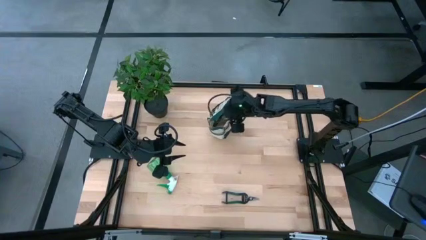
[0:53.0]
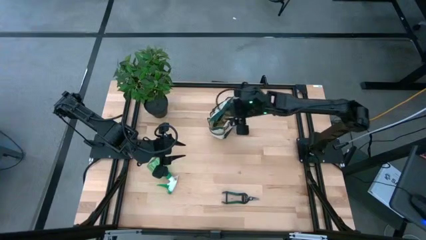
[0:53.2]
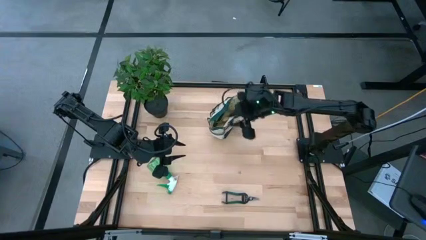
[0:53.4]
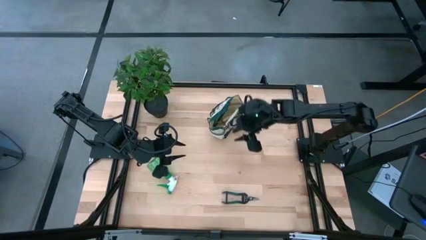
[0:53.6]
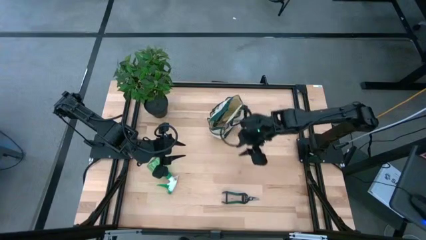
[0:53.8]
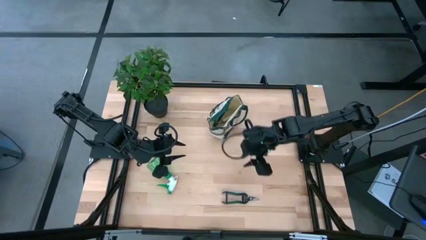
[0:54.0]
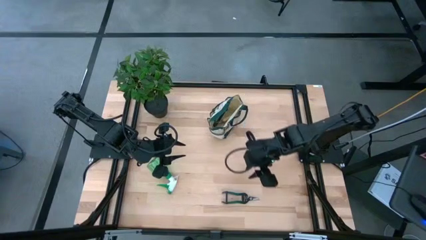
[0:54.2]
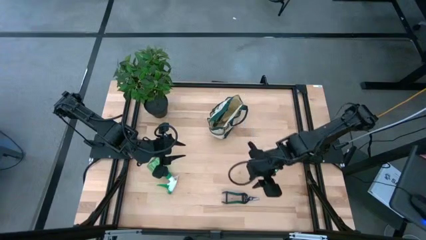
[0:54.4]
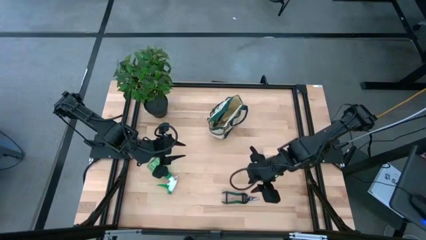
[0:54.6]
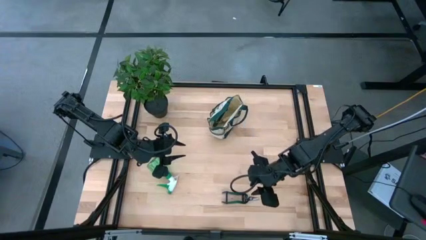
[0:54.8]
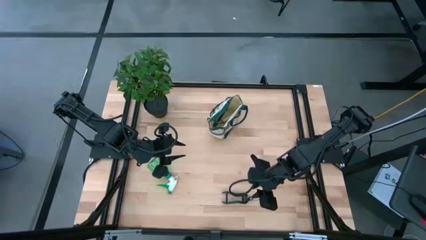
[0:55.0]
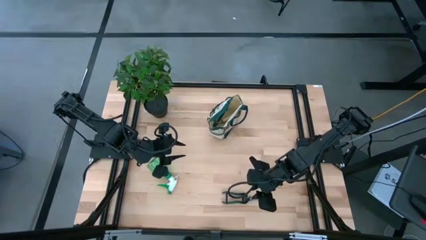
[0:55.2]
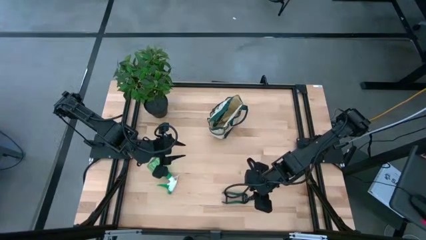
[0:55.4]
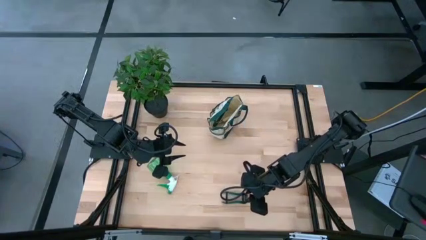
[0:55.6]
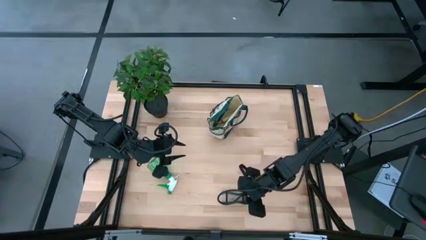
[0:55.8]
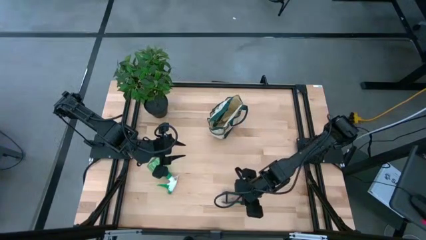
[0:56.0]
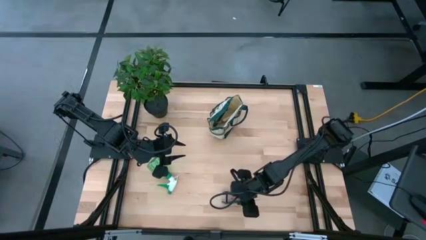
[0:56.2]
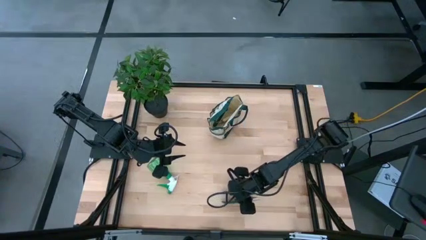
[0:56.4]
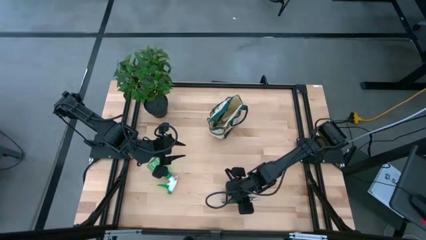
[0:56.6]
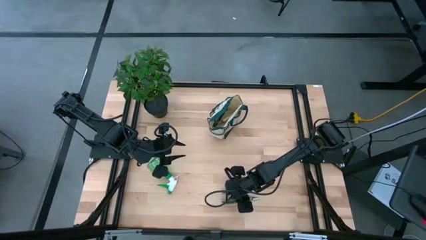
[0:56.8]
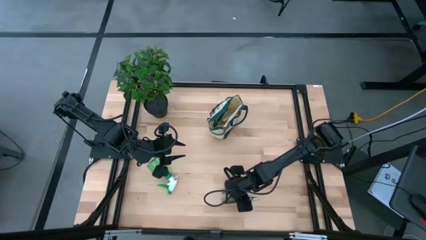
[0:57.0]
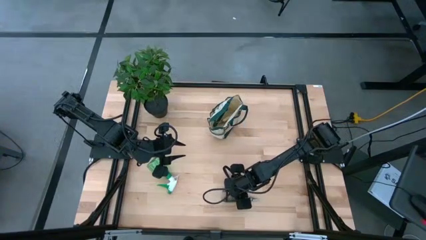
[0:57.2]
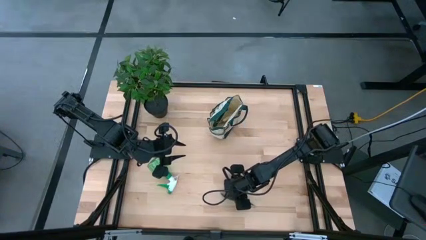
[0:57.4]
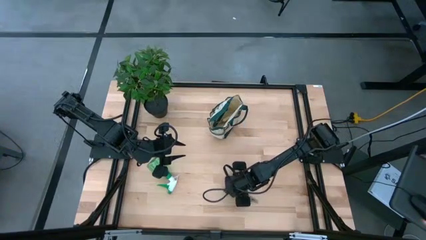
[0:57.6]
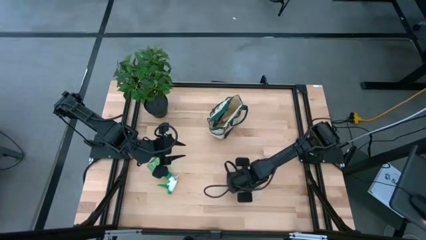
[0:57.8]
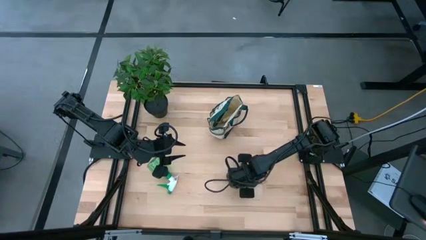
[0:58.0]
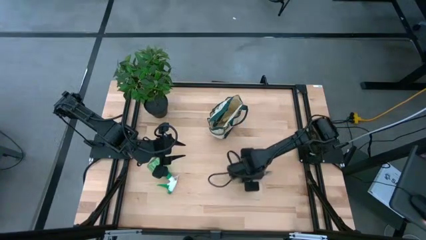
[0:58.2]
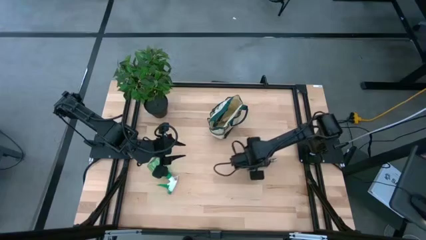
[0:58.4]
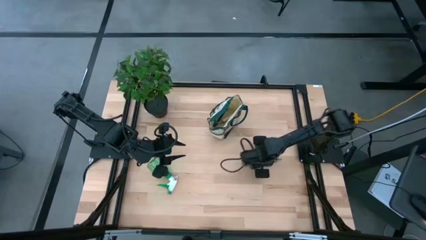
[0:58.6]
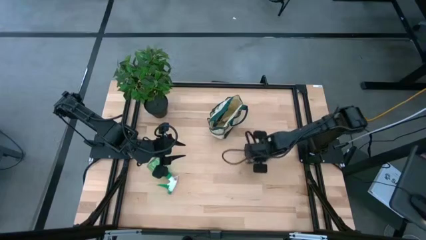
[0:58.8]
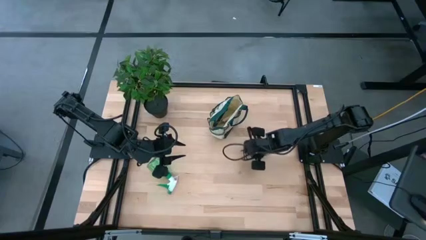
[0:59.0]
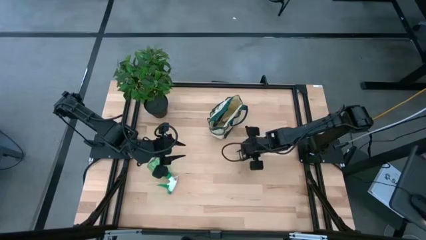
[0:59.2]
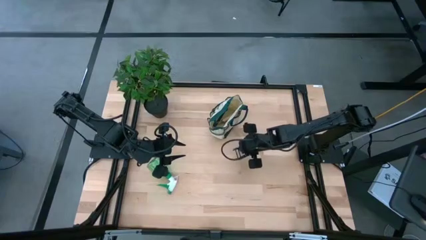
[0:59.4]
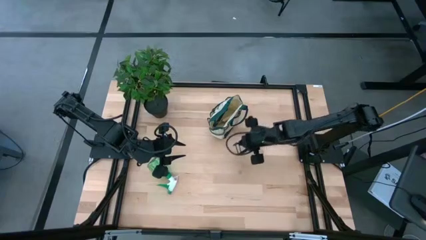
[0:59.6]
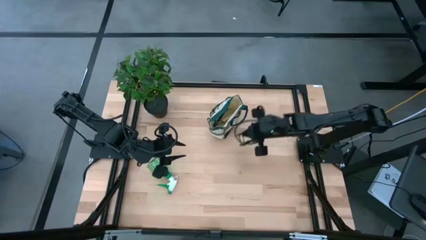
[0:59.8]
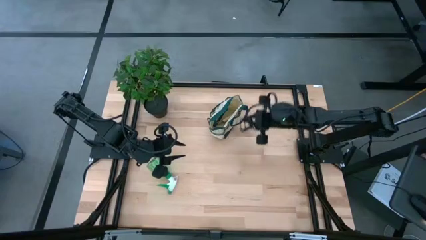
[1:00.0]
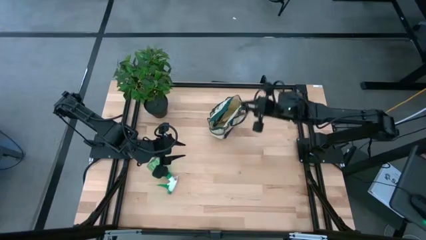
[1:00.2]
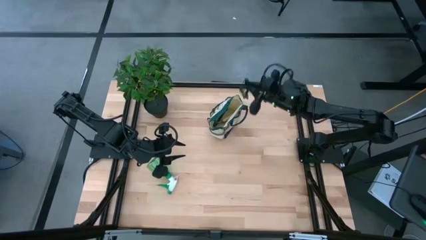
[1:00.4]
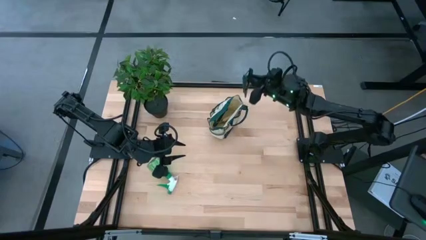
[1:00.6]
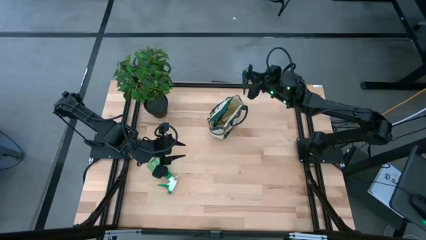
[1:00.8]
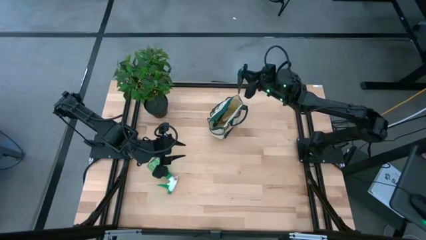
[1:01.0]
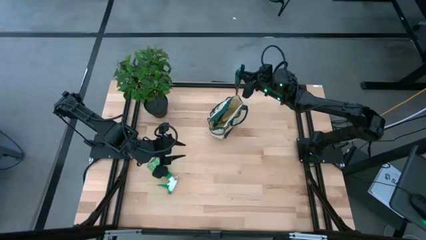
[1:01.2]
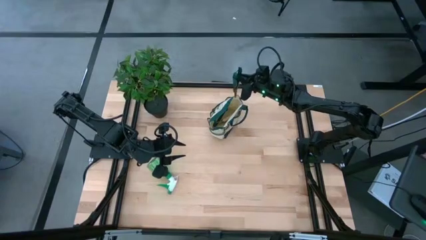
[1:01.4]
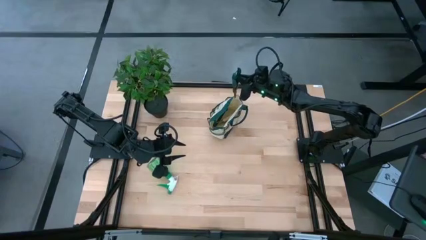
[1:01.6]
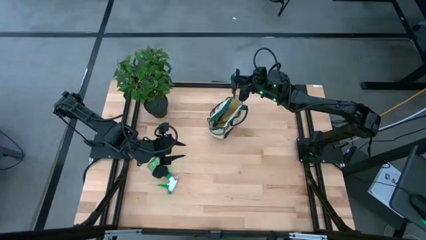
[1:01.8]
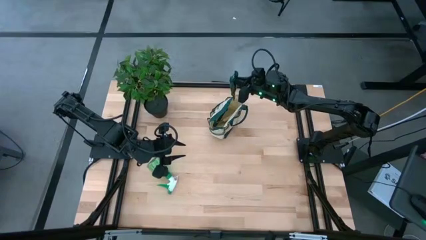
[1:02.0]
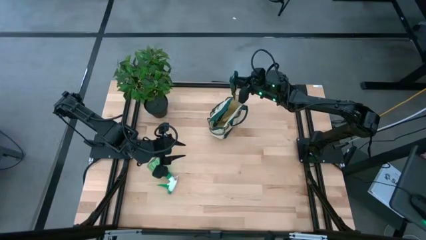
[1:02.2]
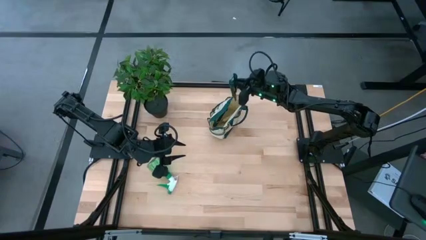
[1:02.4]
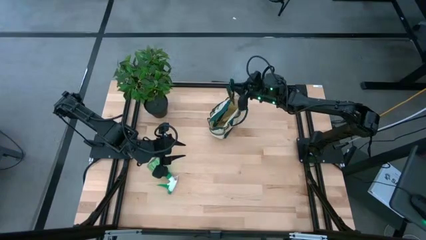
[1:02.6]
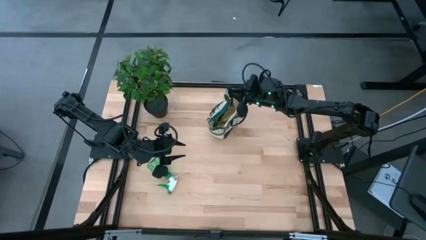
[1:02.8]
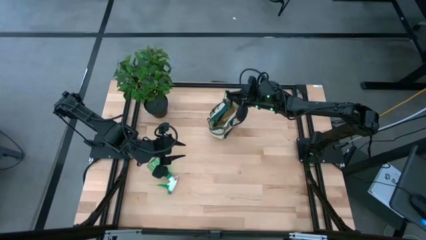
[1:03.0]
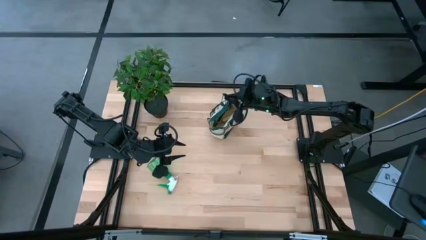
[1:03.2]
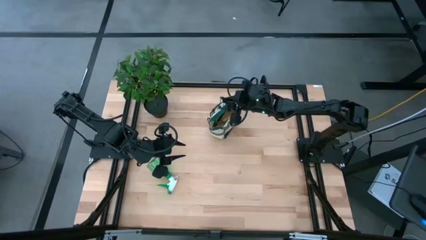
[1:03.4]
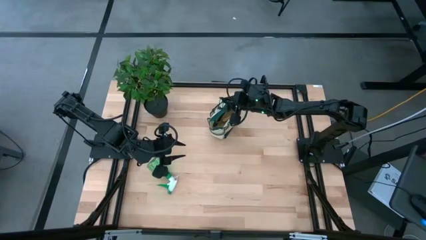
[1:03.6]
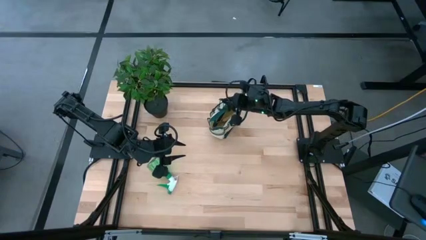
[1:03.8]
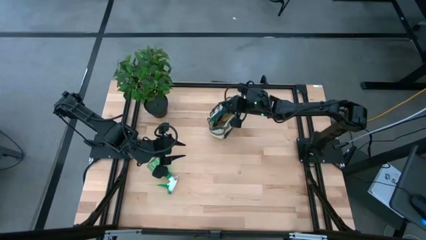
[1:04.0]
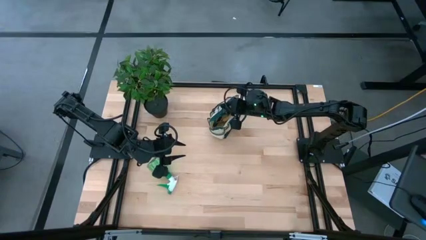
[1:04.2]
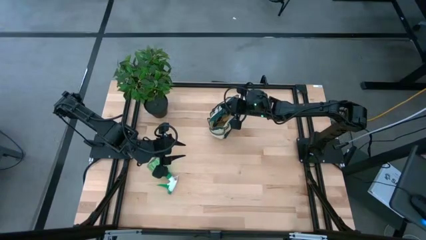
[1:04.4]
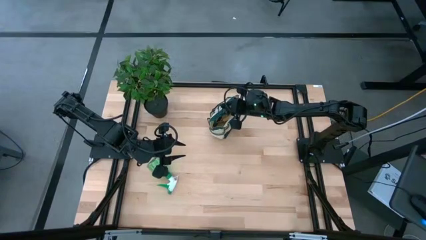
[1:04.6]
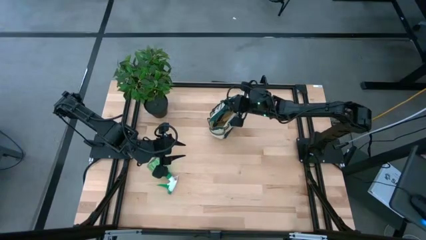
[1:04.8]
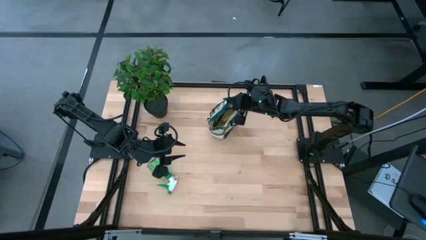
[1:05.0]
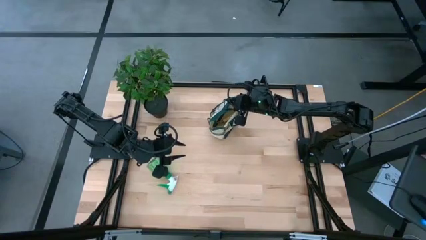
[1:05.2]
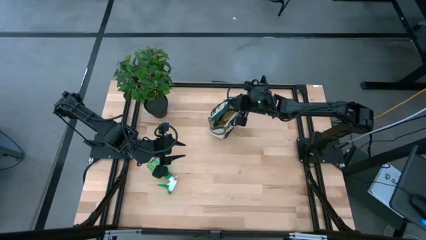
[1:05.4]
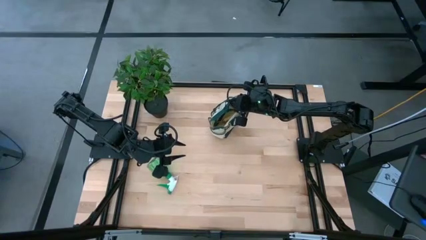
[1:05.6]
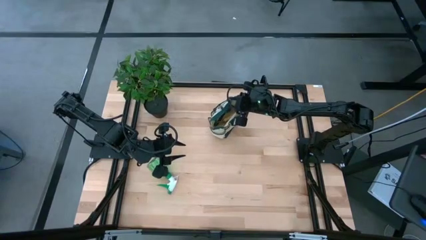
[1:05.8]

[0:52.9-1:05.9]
Task: Pick & Place Garden tools in Gardening bag
Put the green shear scissors into the green gardening bag

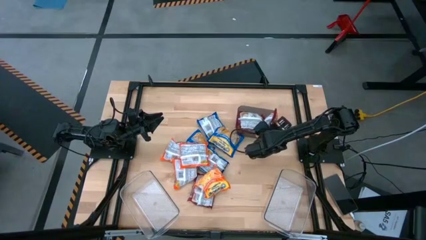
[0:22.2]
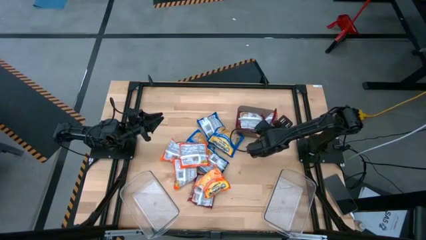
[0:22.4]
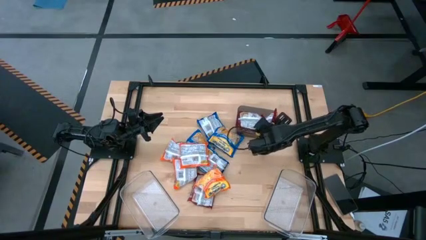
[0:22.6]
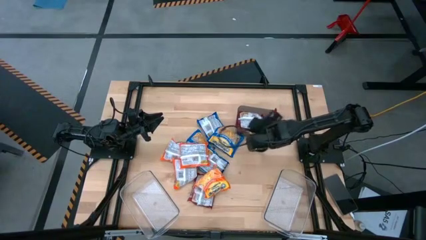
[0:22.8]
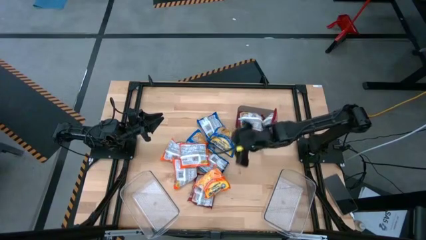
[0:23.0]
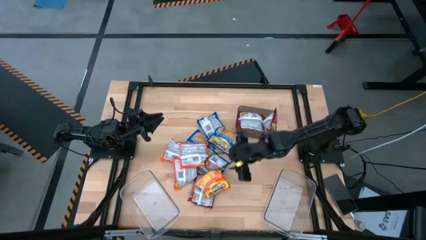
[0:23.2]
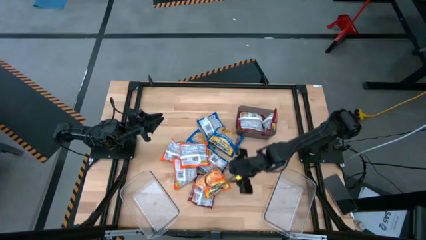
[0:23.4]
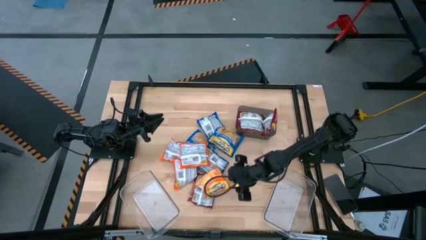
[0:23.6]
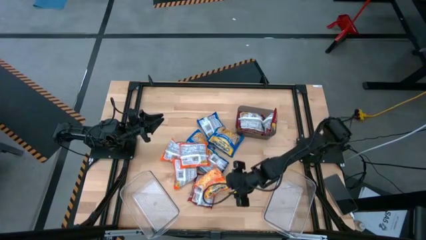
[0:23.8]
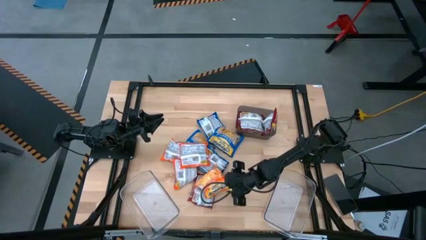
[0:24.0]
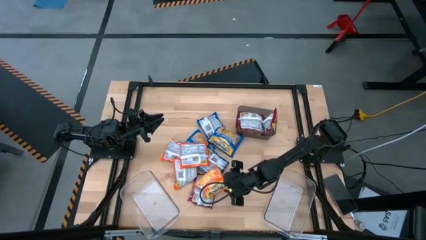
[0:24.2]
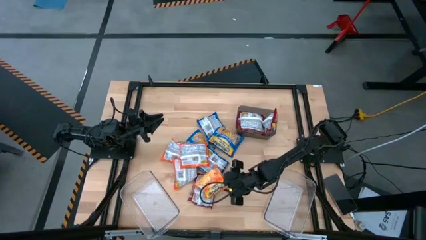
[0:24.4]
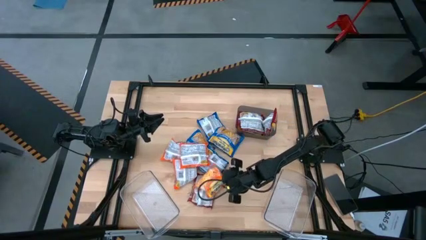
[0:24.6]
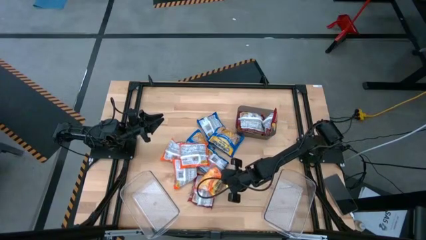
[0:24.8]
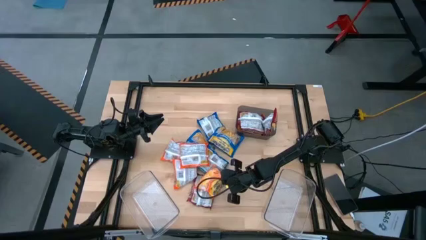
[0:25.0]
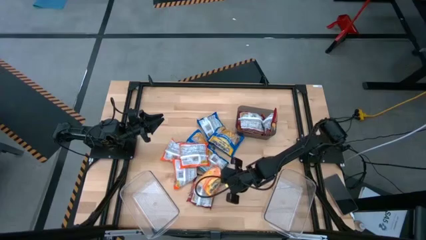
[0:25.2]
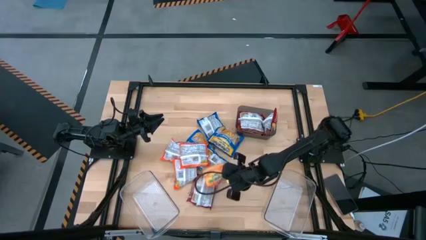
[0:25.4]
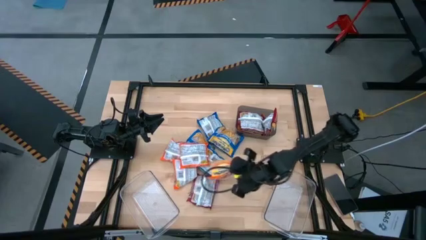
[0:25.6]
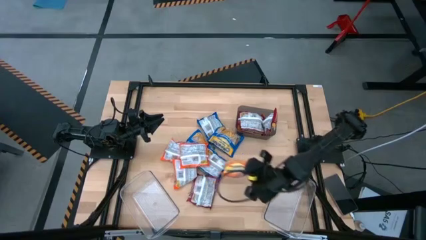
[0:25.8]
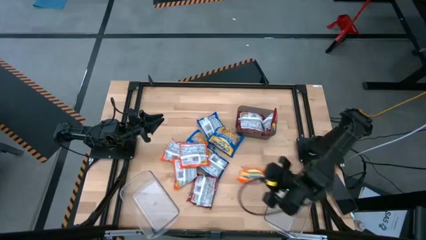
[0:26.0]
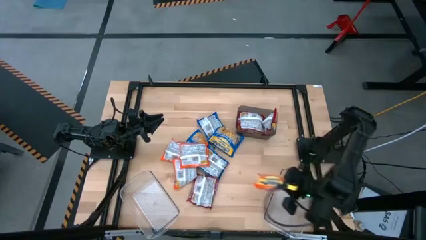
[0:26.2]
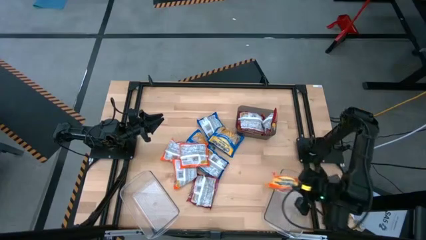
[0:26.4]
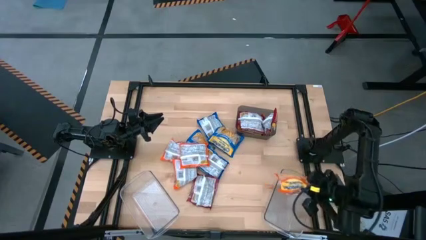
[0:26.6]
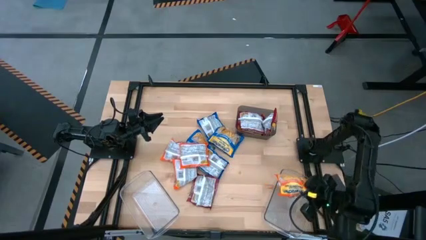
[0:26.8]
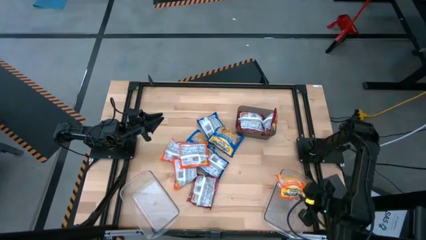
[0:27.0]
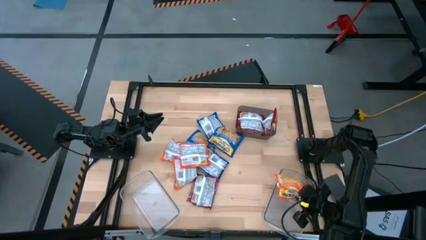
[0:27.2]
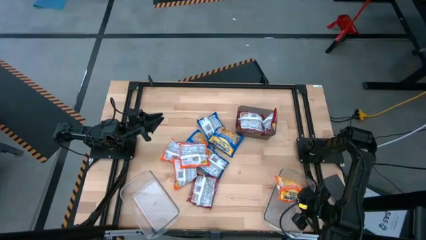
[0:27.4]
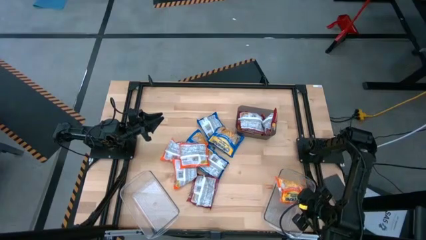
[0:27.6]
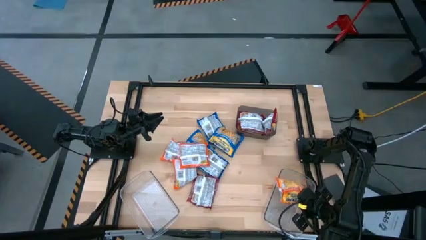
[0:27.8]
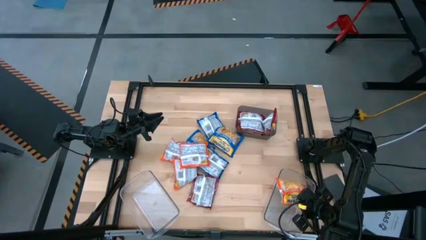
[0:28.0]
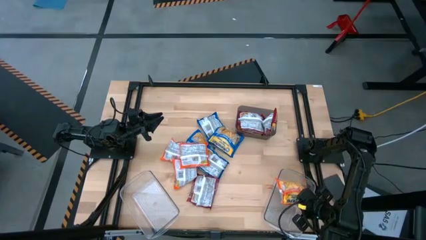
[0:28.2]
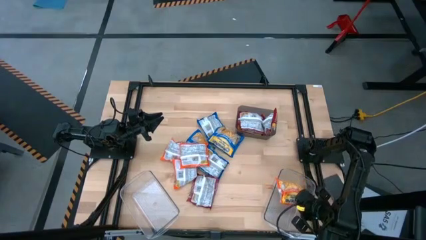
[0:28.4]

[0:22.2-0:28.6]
Task: Sort Maruchan noodles
Put the orange noodle pack into the right transparent bin
